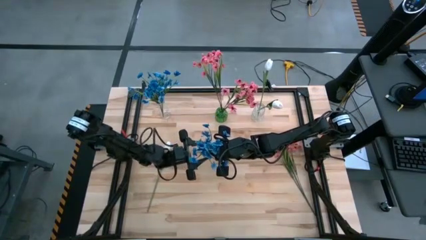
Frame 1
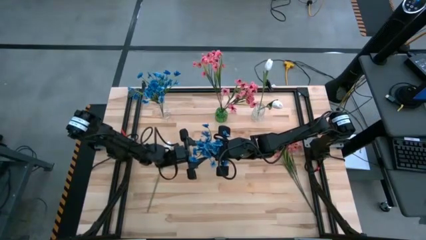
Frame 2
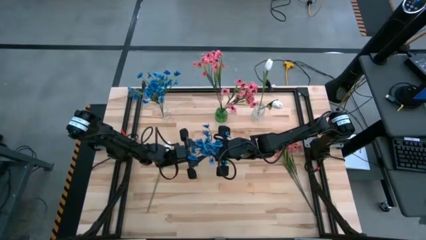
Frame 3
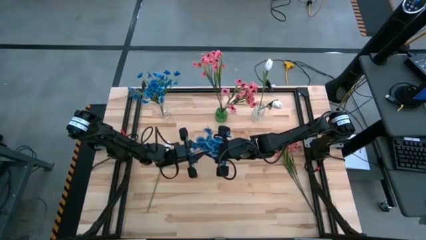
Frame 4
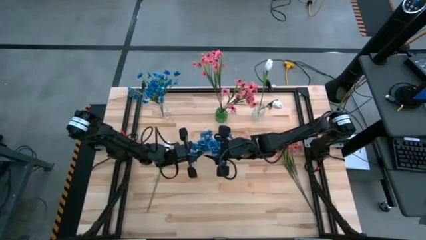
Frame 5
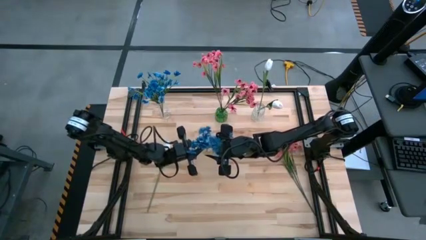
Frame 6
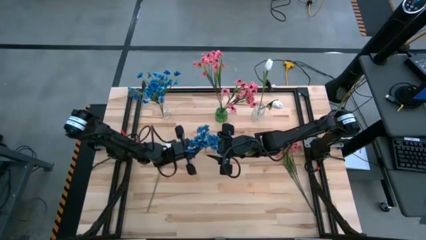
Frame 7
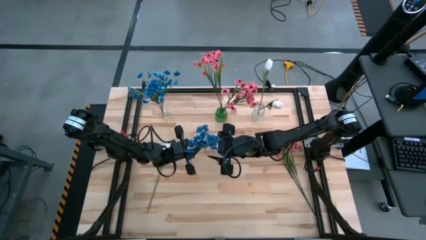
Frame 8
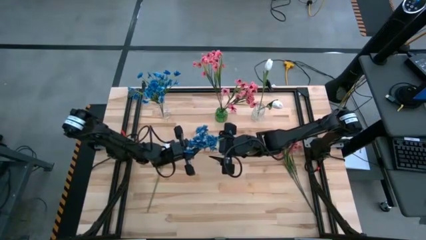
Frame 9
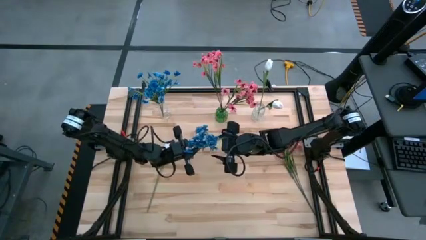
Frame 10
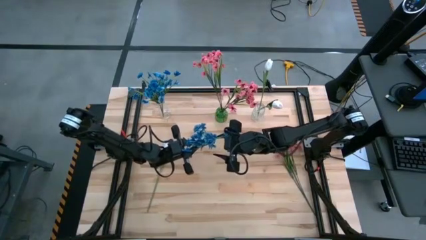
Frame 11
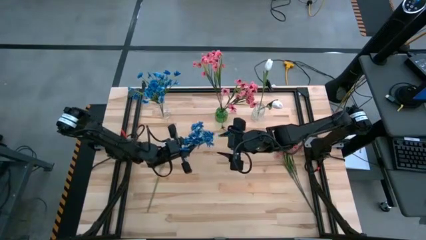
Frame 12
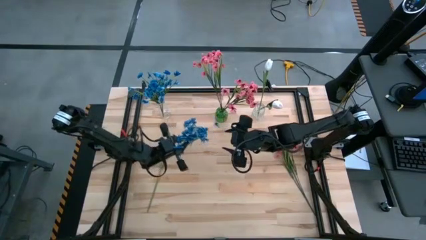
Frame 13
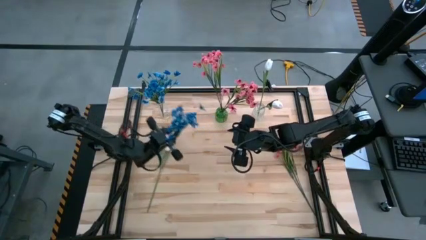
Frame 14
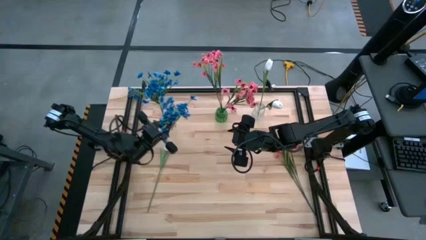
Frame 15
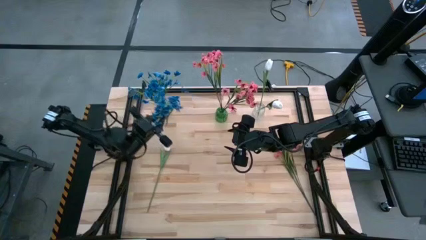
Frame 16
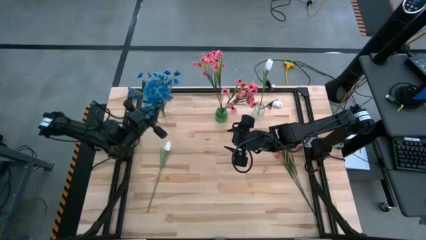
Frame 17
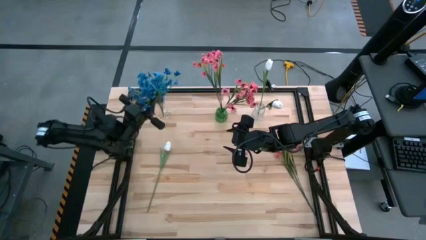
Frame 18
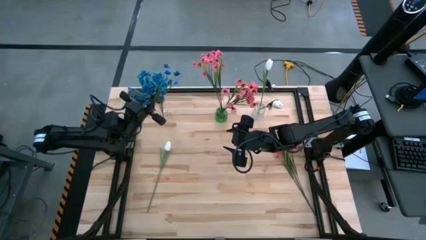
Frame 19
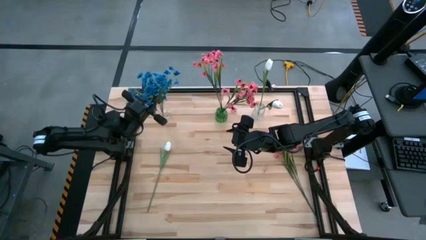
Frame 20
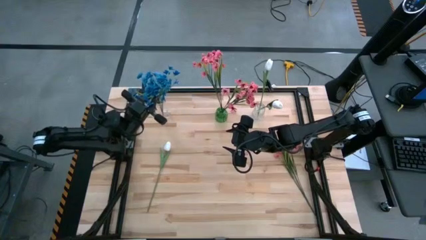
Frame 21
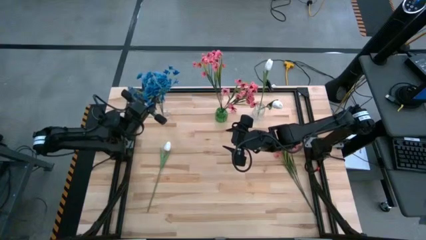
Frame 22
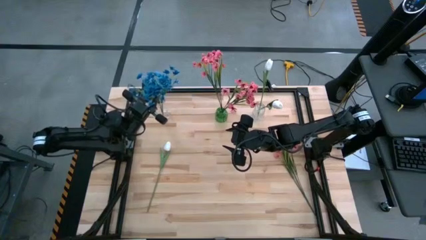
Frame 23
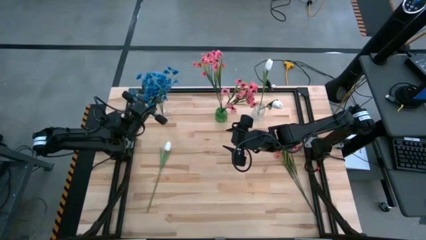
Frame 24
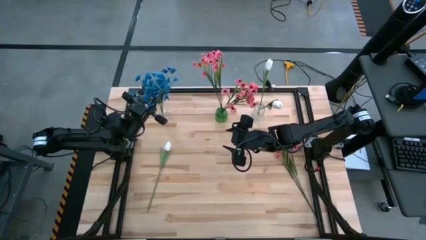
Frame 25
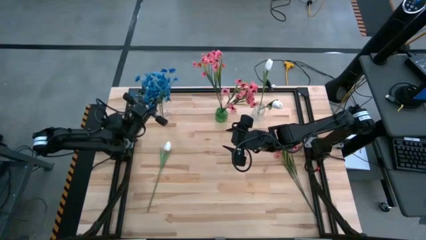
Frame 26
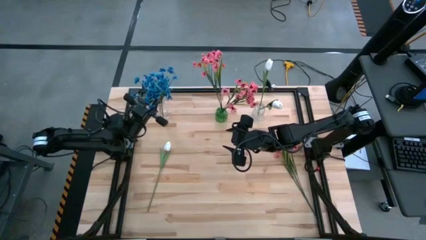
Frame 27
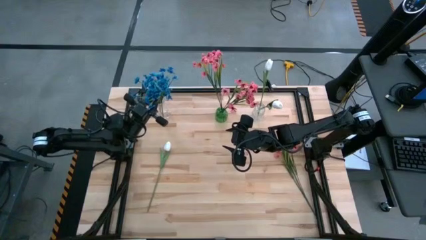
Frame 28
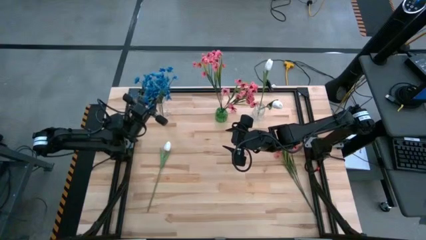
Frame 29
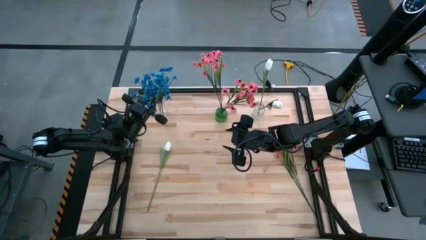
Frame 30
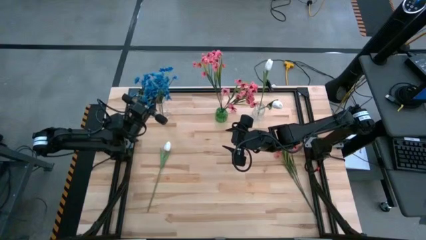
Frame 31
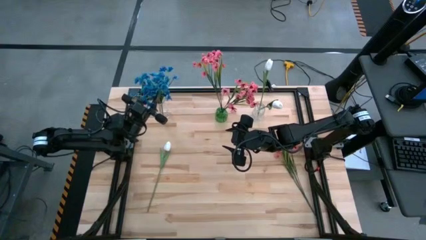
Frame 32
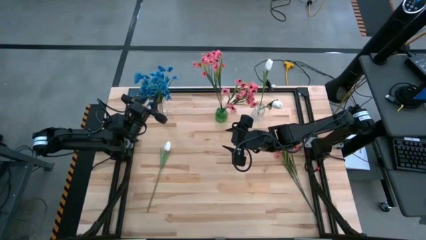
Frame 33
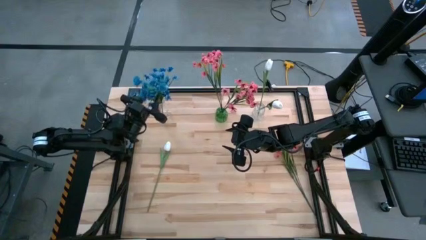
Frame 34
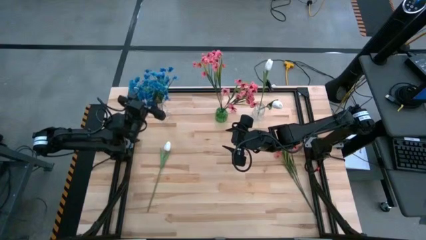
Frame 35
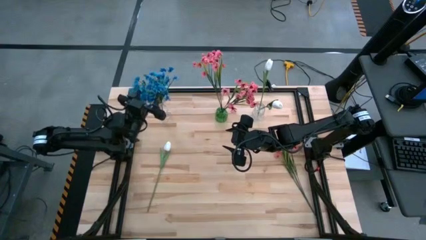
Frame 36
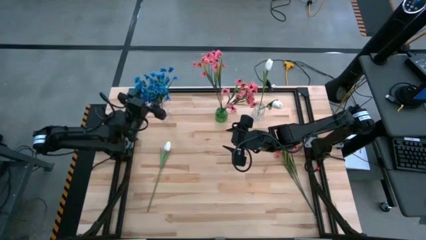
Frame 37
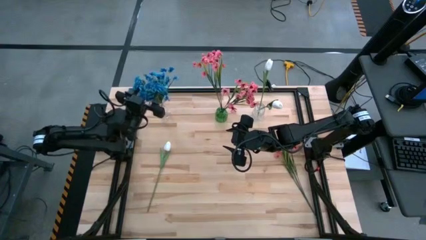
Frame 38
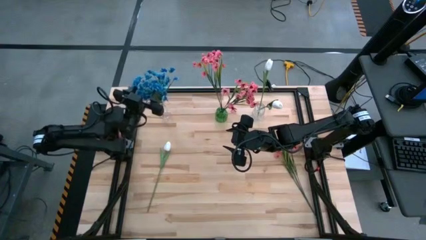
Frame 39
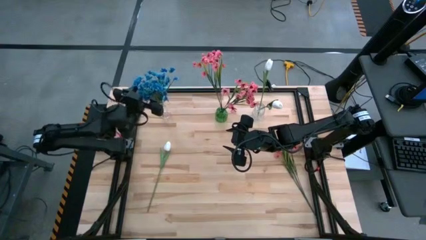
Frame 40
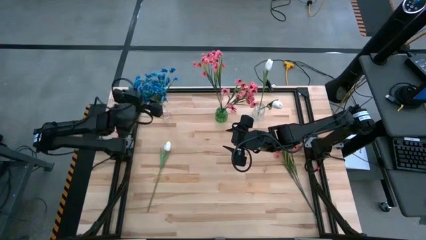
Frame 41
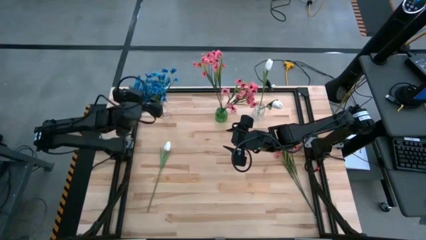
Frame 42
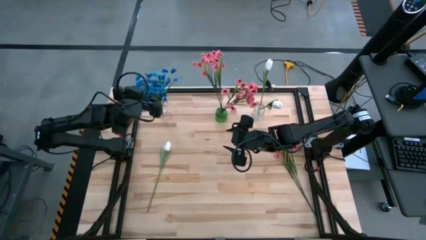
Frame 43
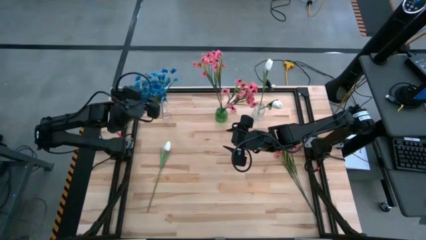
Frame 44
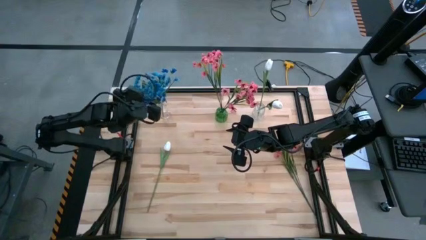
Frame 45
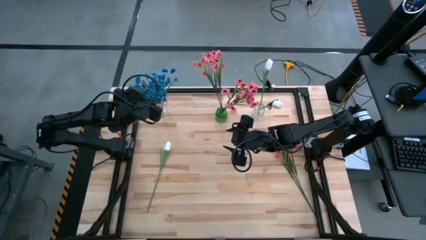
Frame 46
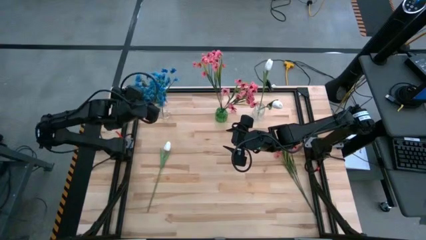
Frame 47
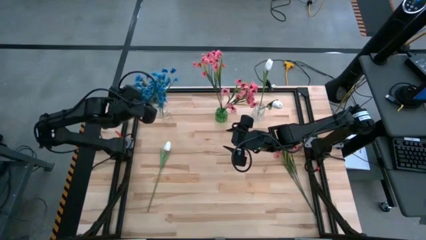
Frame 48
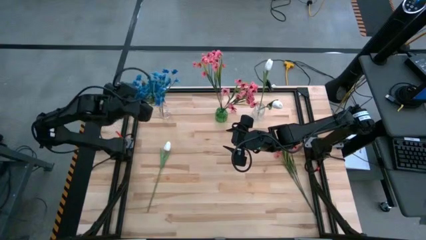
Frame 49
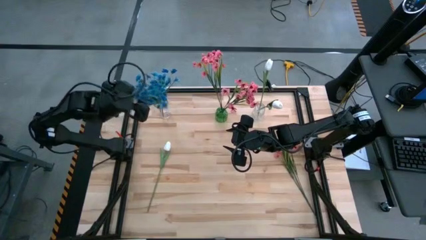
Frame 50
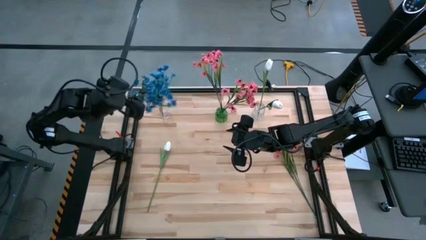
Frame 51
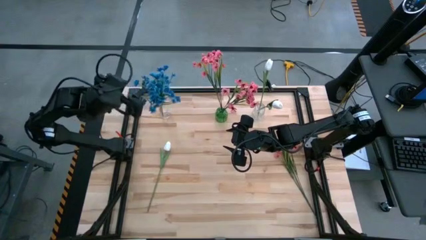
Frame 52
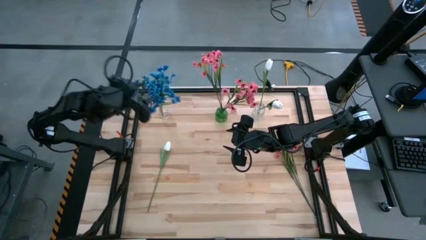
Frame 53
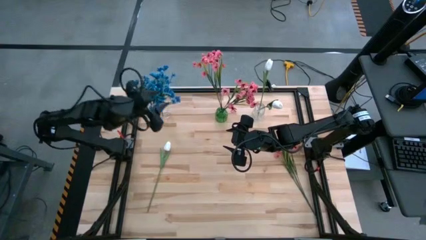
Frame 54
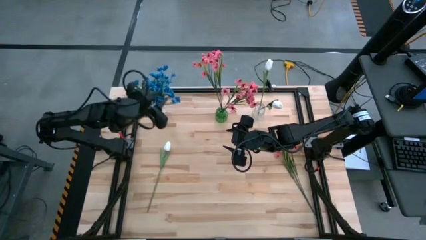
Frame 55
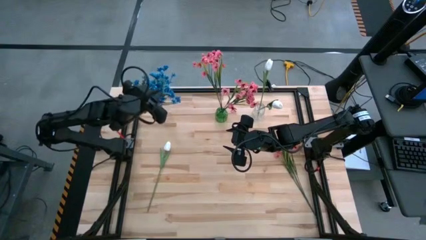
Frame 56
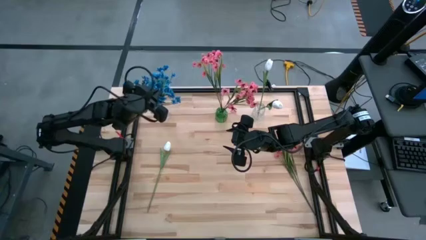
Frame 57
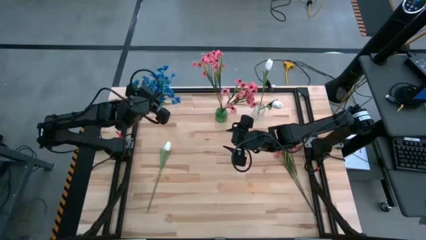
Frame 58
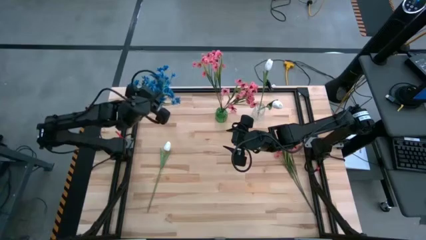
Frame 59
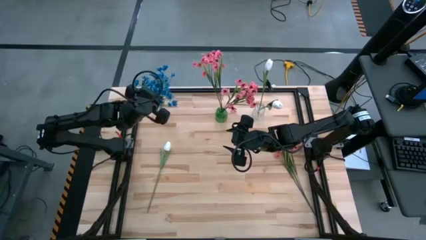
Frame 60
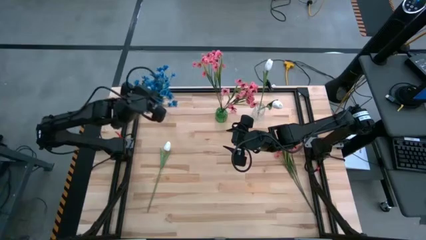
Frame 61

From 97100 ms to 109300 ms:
Task: Sort flowers into vase by color
Put the blue flowers into the left transparent vase
